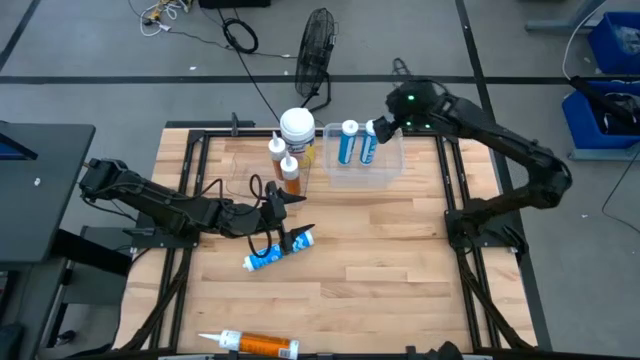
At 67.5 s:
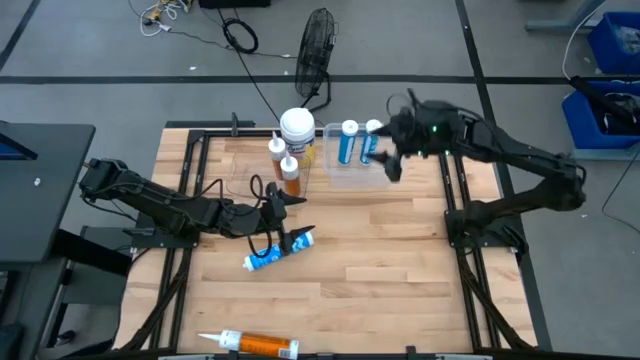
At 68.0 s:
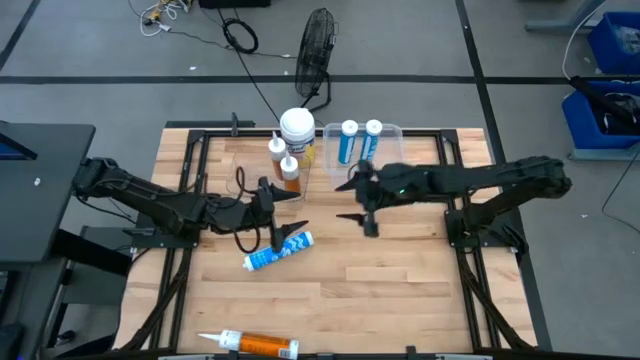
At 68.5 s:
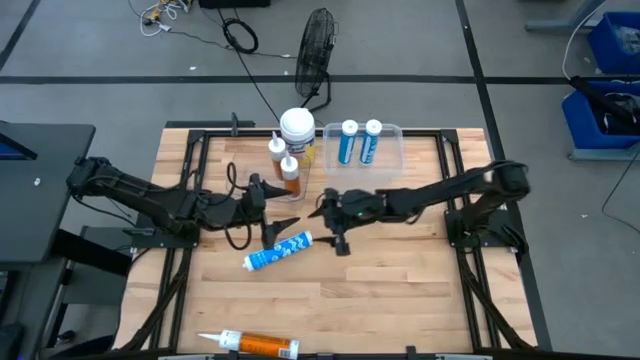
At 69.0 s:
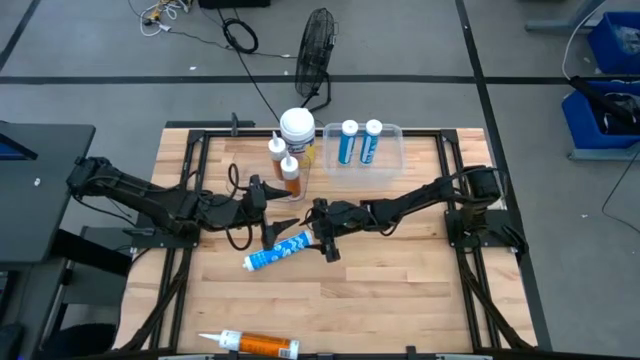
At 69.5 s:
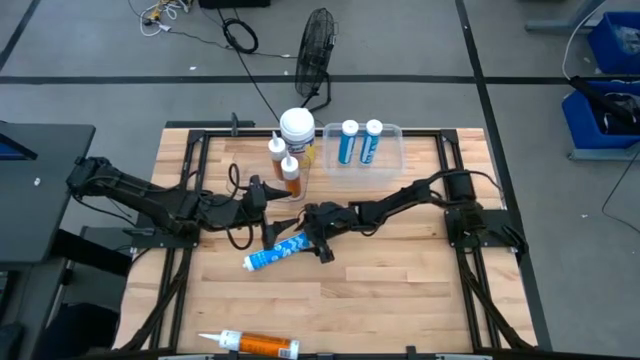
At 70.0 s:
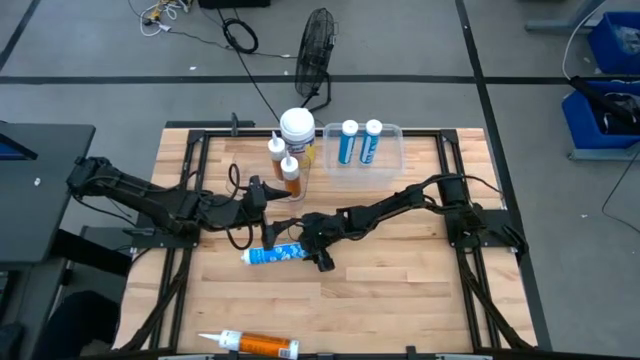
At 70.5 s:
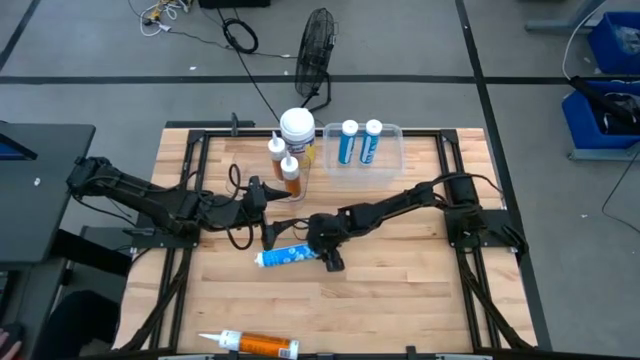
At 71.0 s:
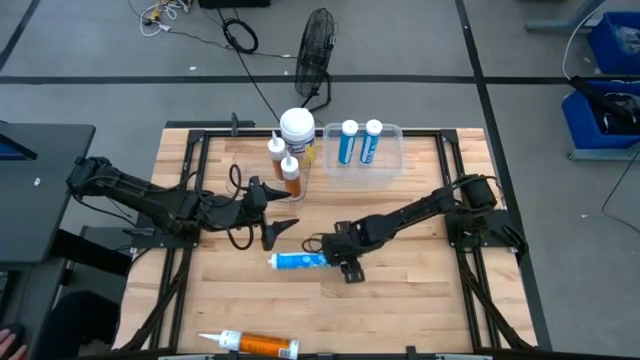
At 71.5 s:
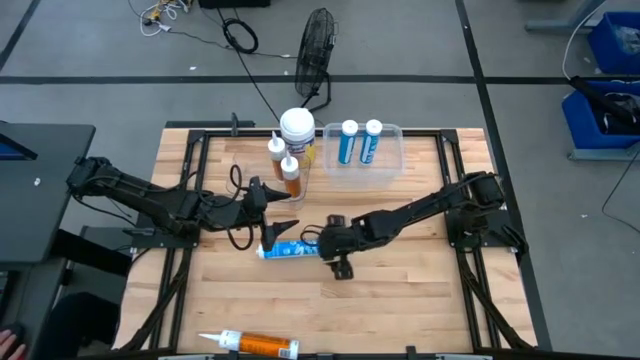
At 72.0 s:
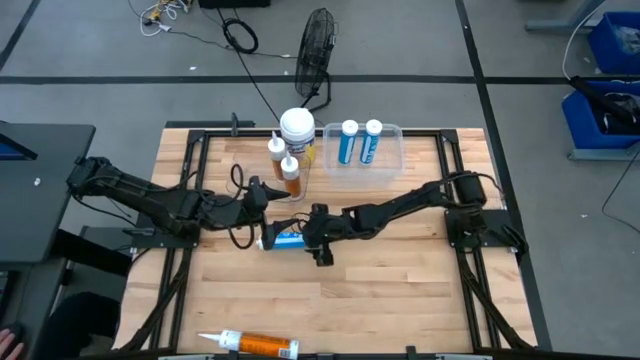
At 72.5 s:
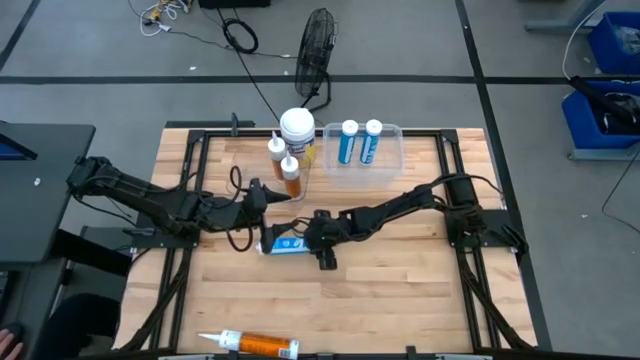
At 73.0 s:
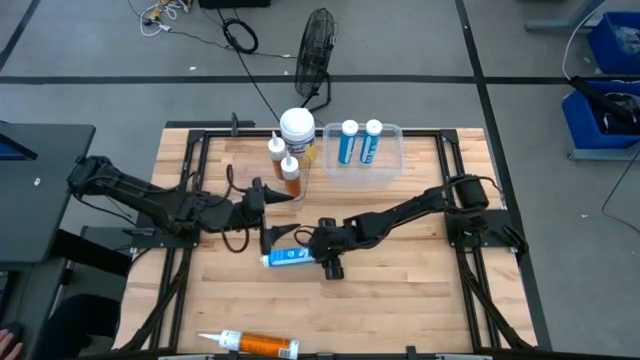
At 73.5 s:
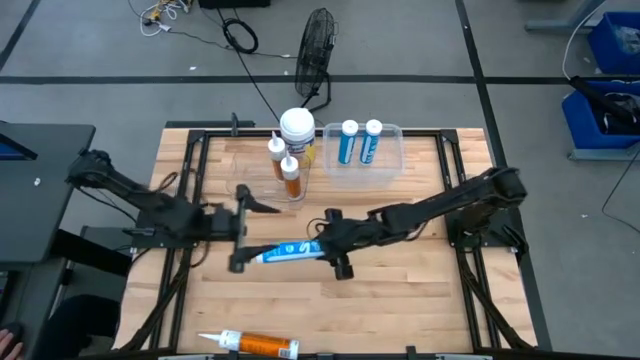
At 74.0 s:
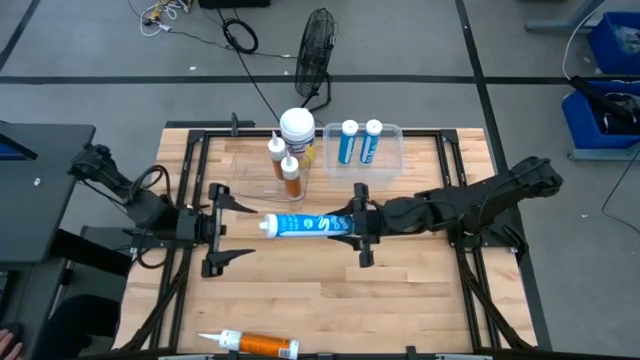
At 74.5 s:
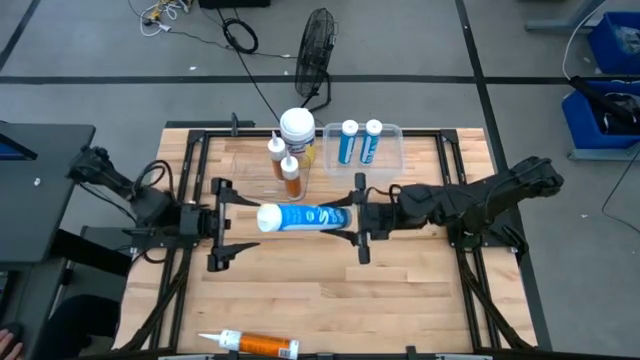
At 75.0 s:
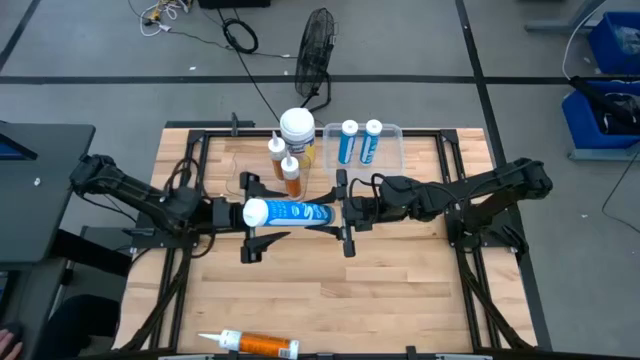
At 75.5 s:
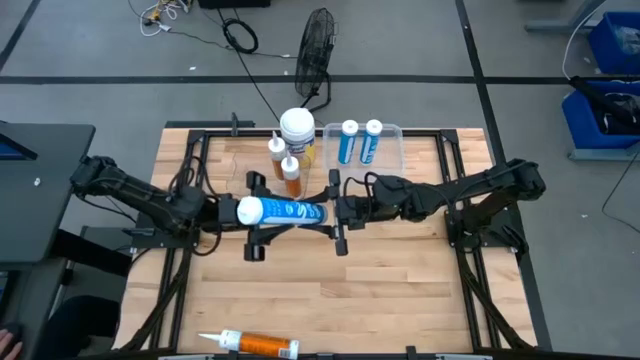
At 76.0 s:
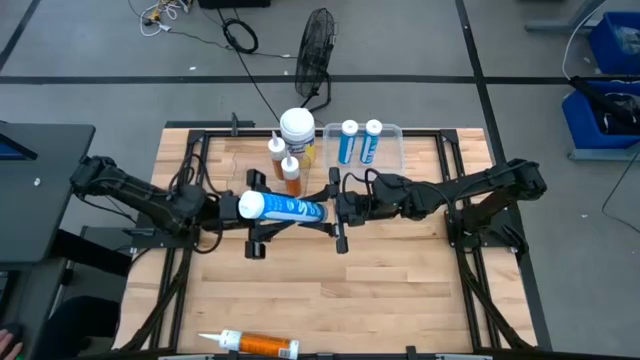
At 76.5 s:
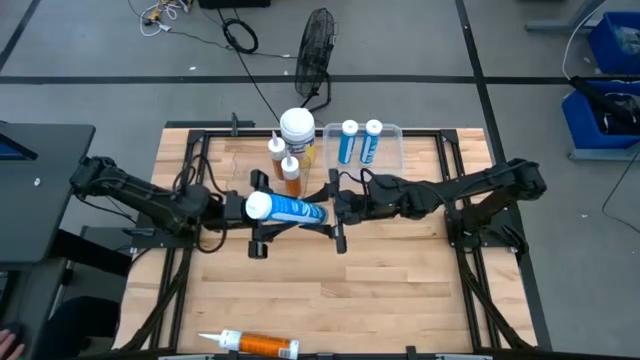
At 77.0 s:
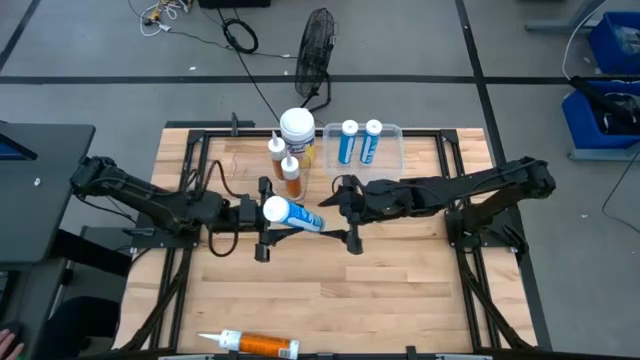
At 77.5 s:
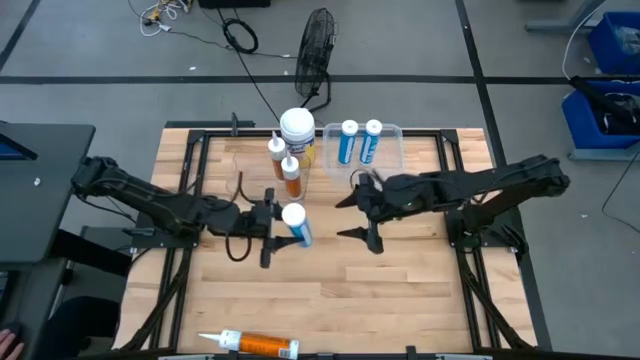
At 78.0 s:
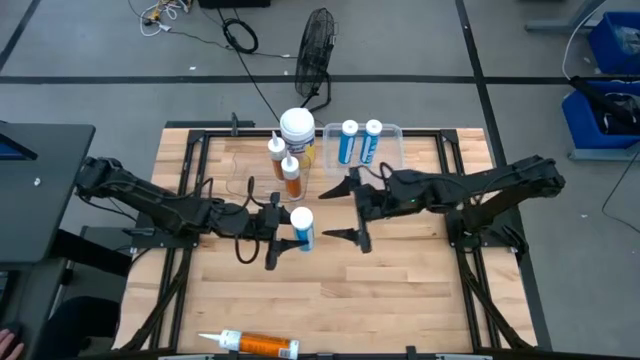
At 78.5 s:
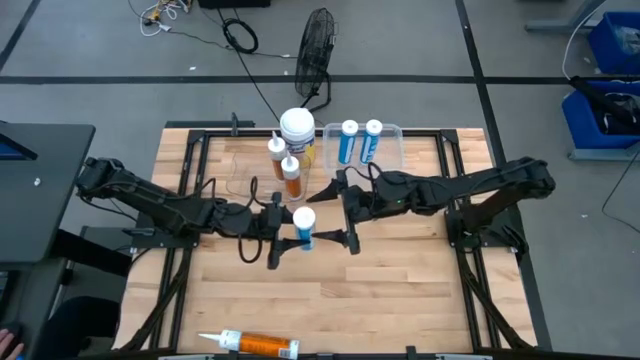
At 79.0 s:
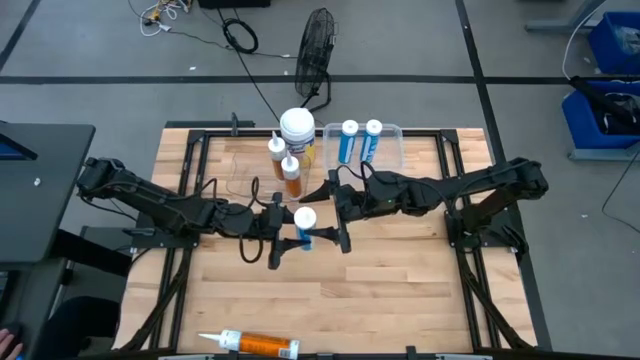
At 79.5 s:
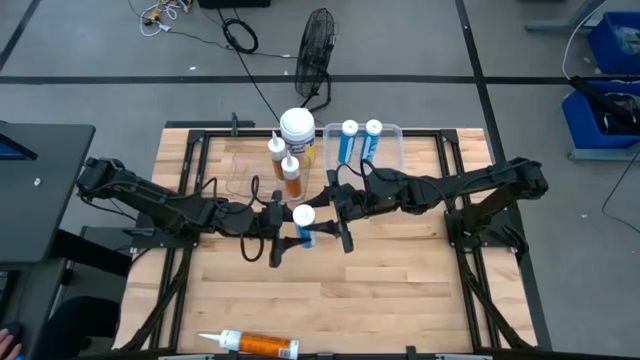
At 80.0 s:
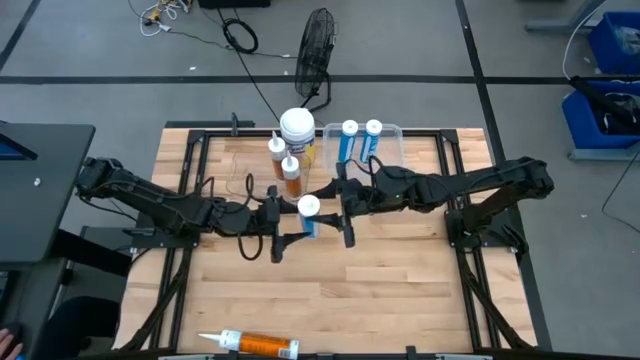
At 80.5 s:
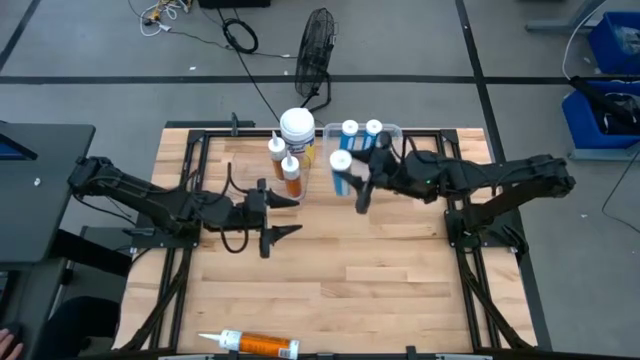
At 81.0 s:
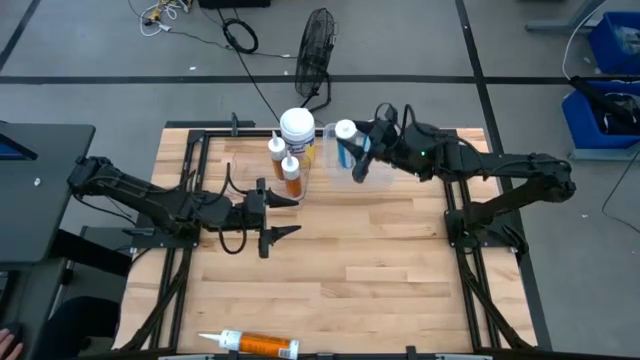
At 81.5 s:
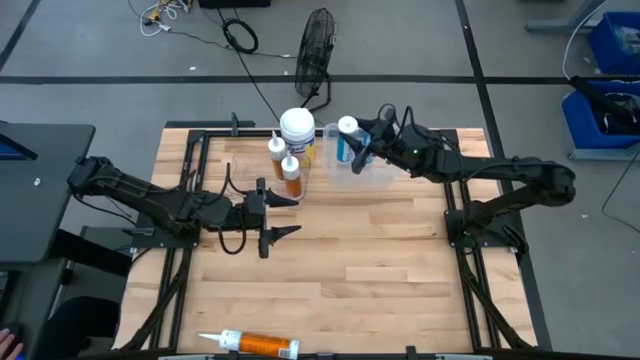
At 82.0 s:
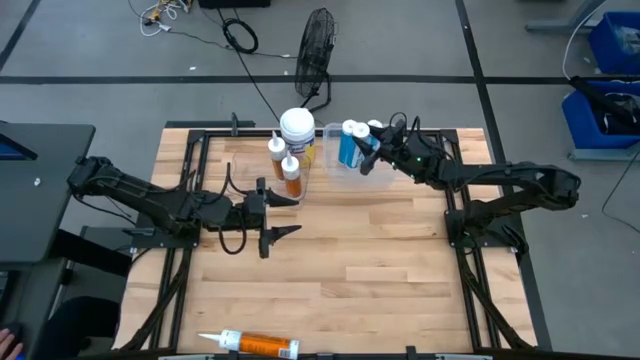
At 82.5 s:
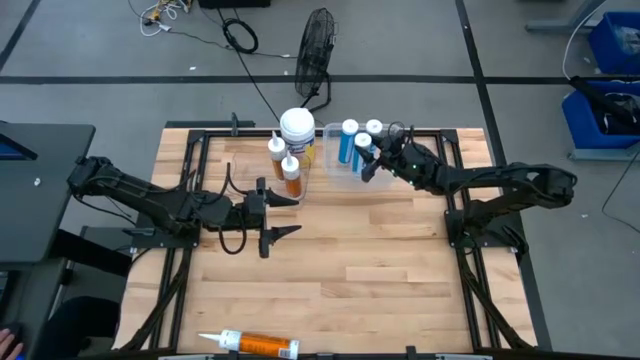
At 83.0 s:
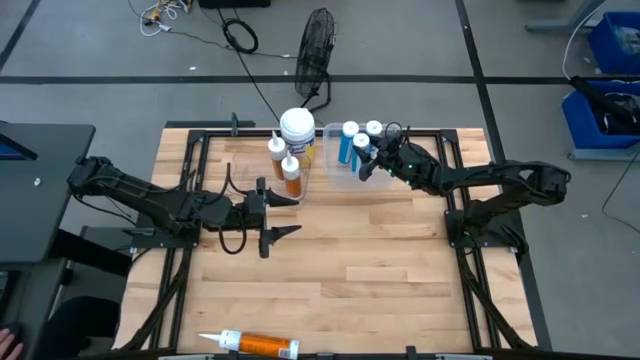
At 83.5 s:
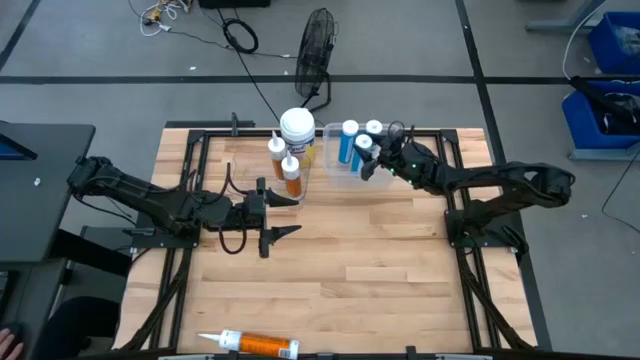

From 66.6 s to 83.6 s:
Task: Pick & place silicon tubes, Sealant and Lysol wipes
Put the blue sealant into the right transparent bin

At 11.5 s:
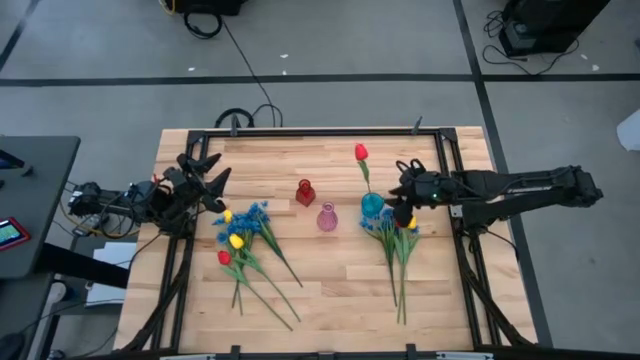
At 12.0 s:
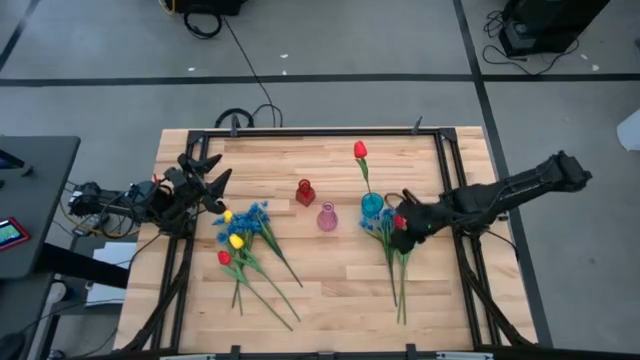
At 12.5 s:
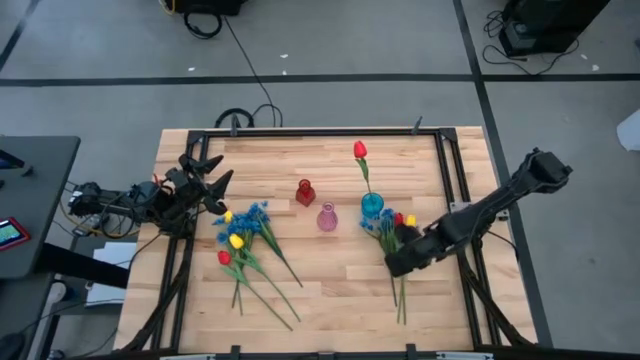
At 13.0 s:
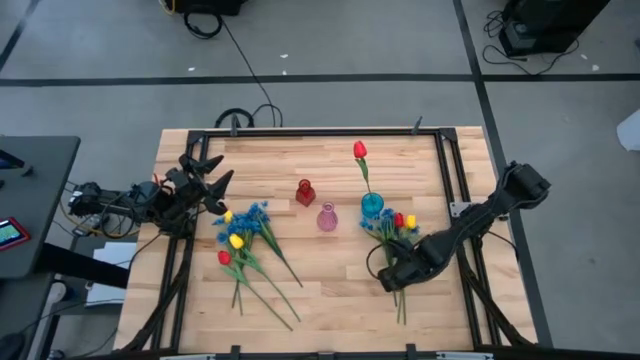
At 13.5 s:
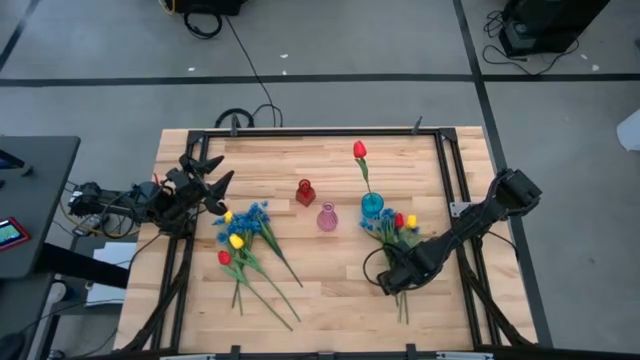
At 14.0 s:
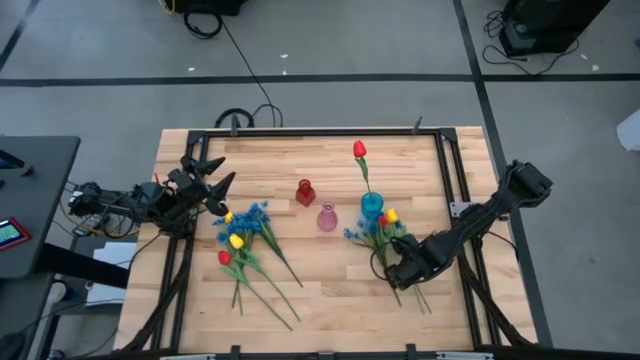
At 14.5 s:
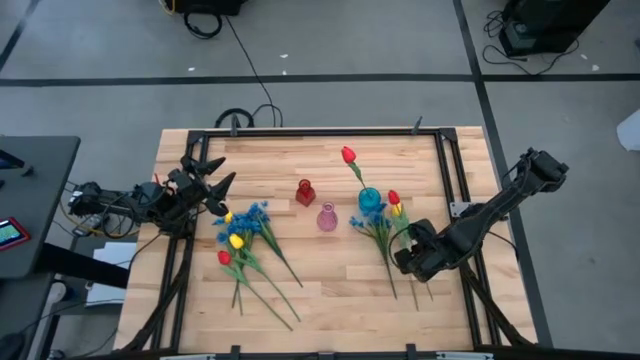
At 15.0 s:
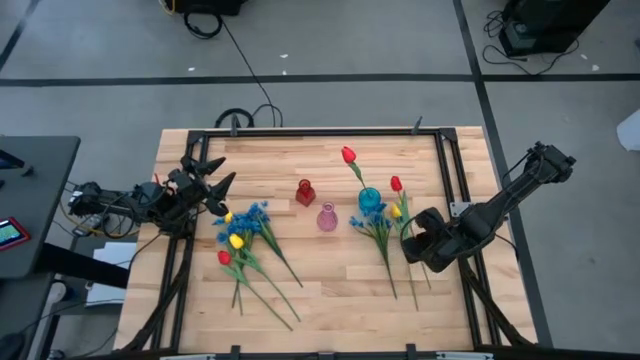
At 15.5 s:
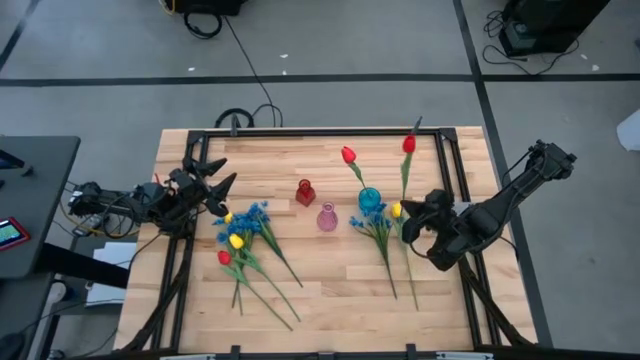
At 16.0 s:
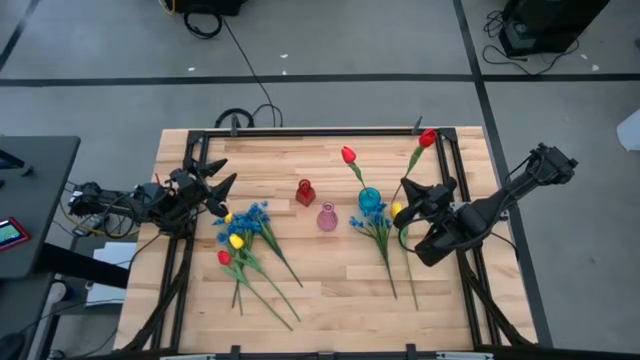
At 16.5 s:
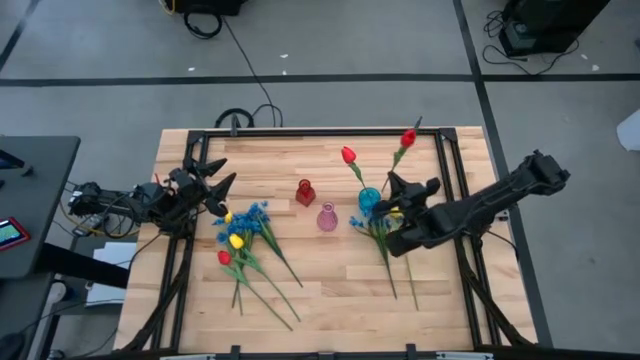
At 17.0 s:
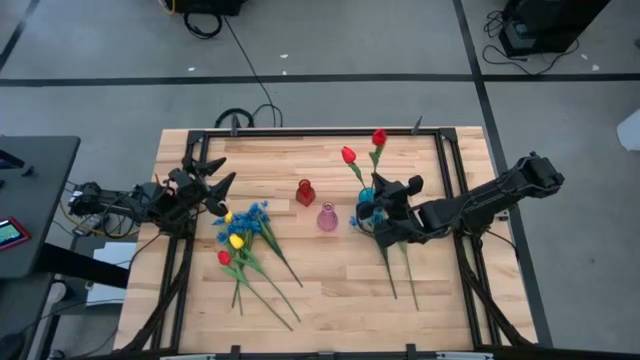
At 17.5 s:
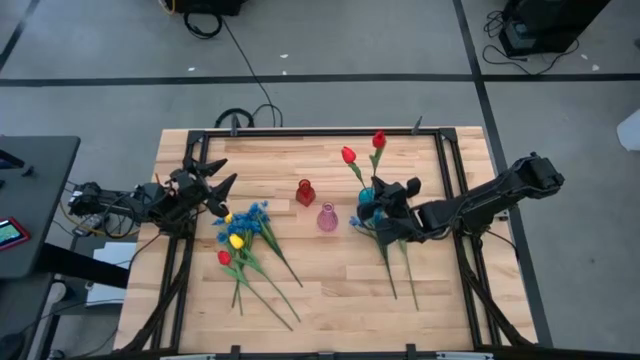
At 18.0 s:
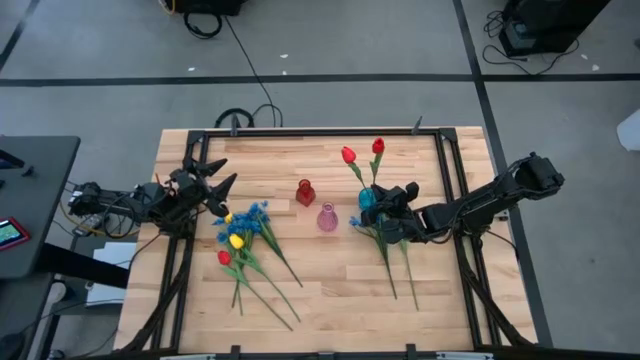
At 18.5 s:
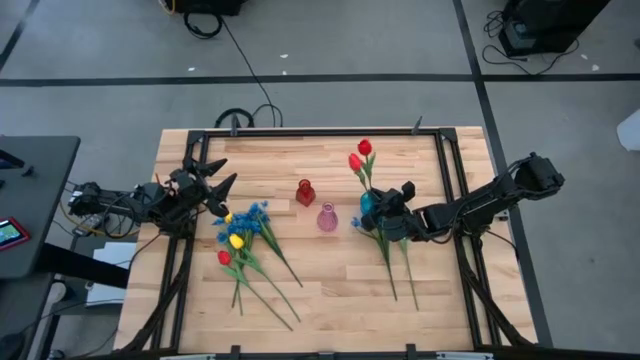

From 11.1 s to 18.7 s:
Task: Sort flowers into vase by color
Put the red tulip into the blue transparent vase
